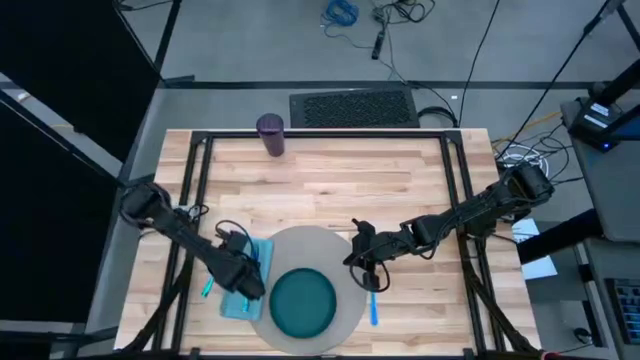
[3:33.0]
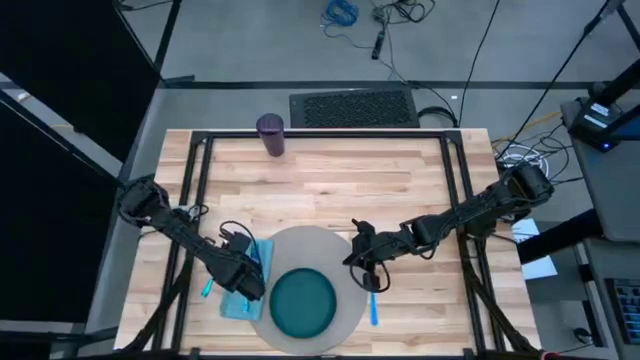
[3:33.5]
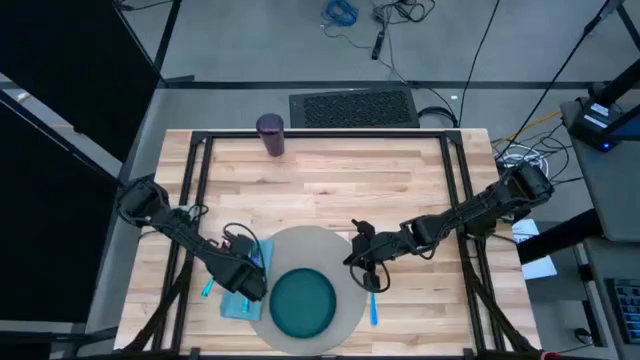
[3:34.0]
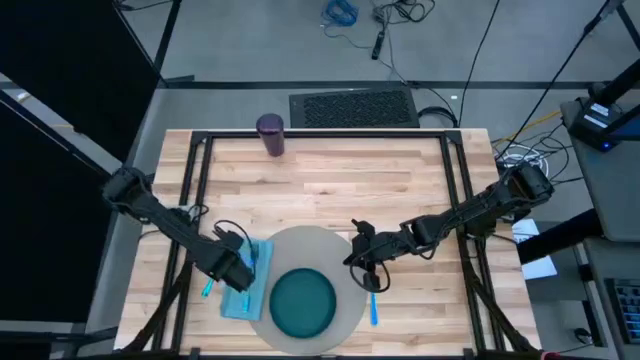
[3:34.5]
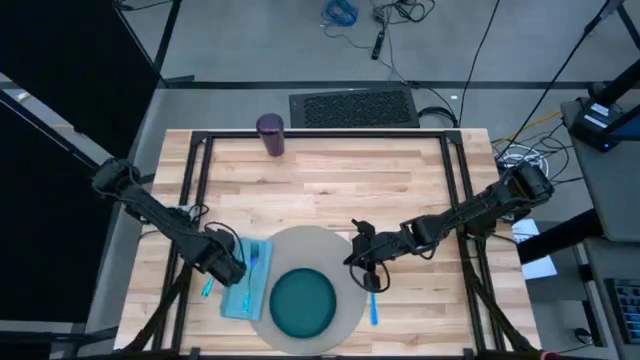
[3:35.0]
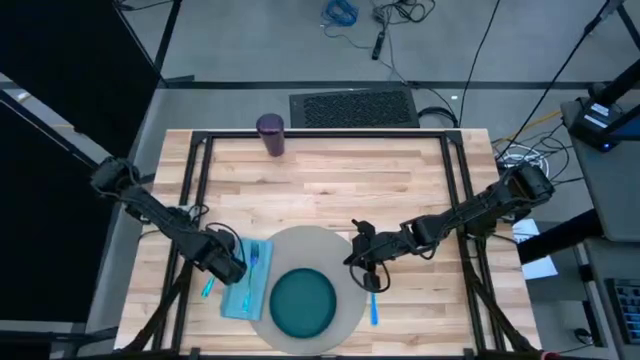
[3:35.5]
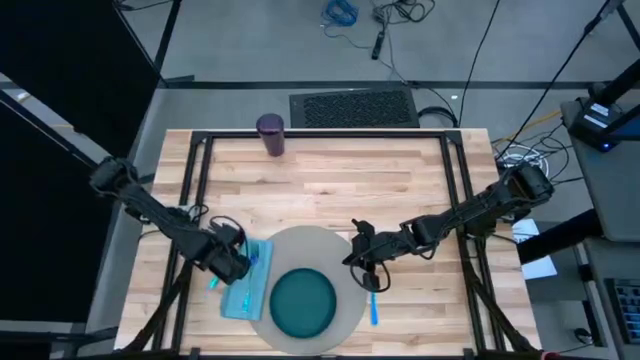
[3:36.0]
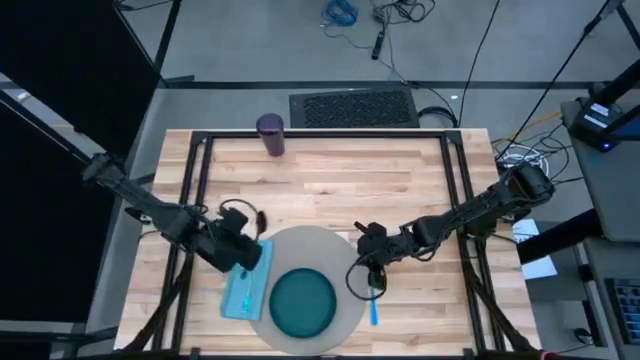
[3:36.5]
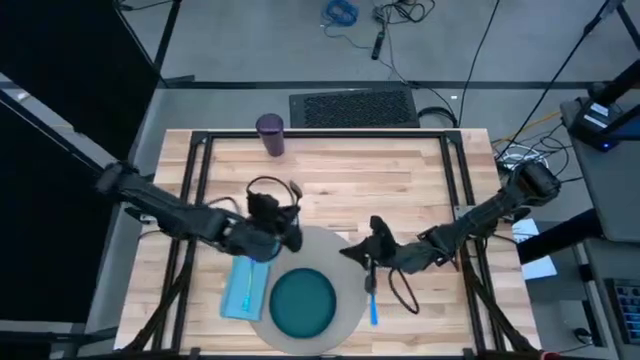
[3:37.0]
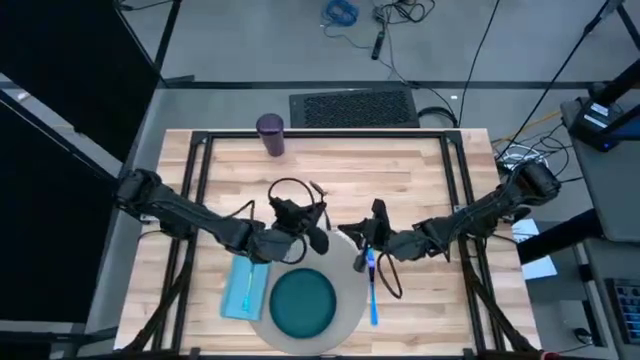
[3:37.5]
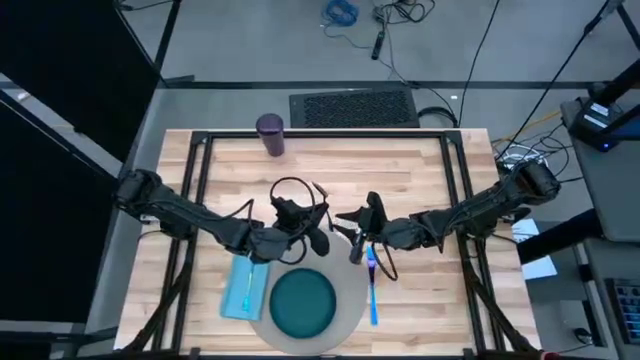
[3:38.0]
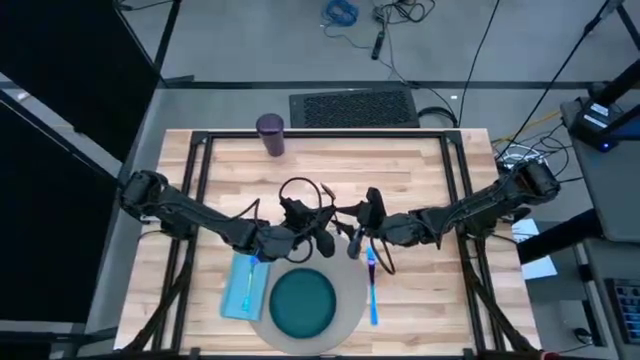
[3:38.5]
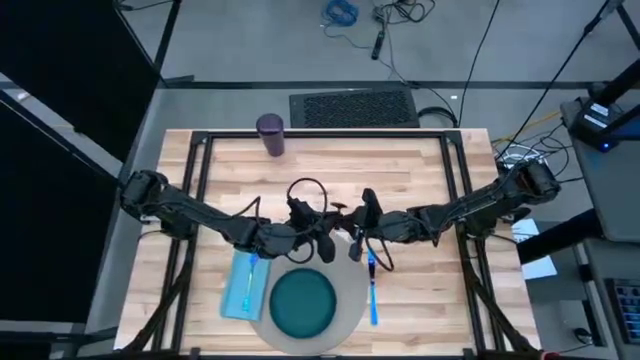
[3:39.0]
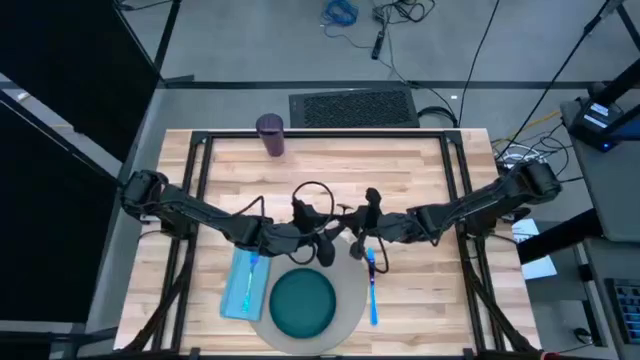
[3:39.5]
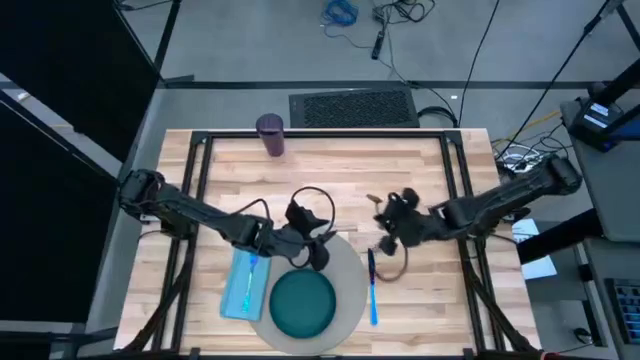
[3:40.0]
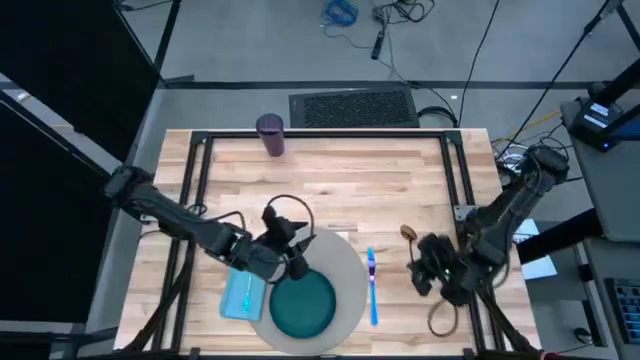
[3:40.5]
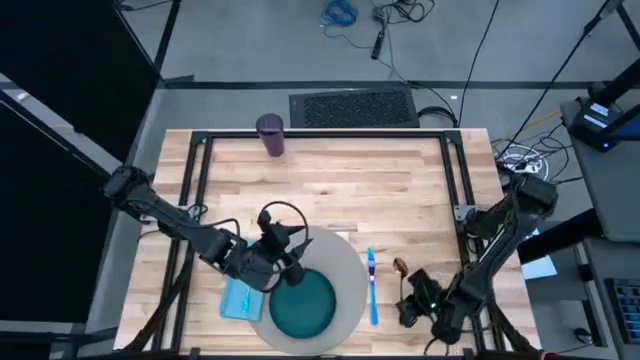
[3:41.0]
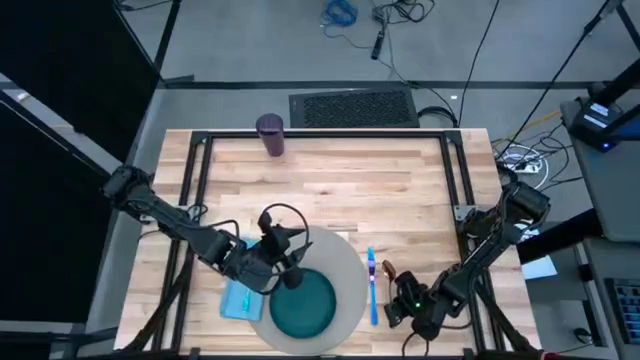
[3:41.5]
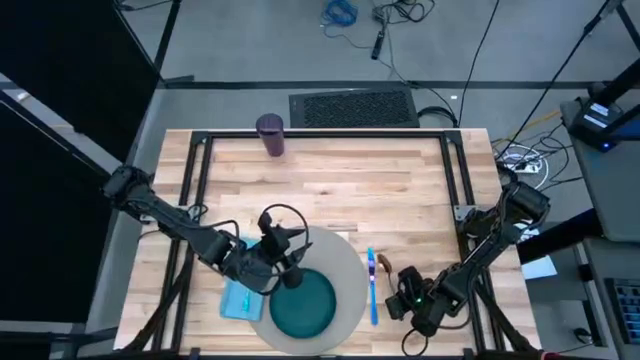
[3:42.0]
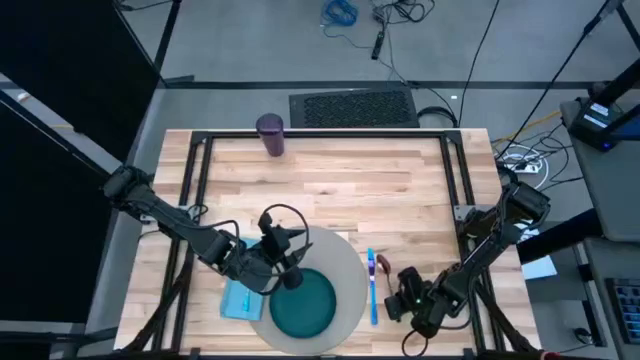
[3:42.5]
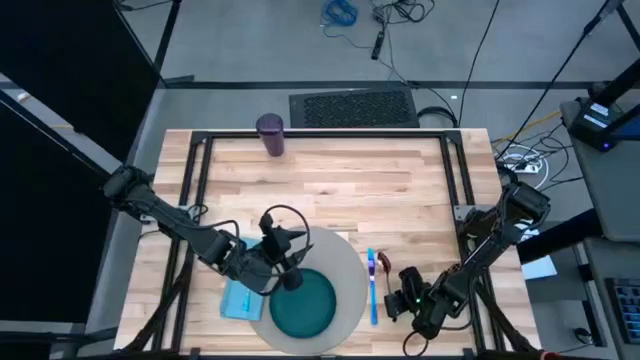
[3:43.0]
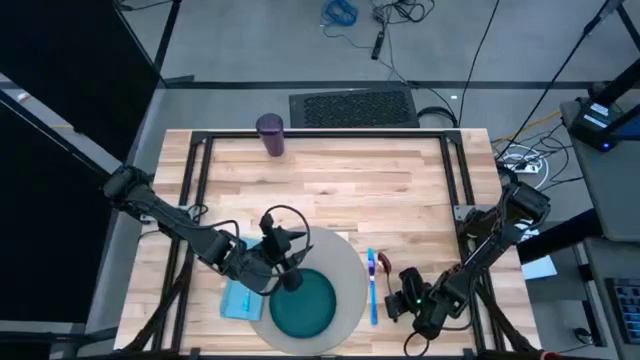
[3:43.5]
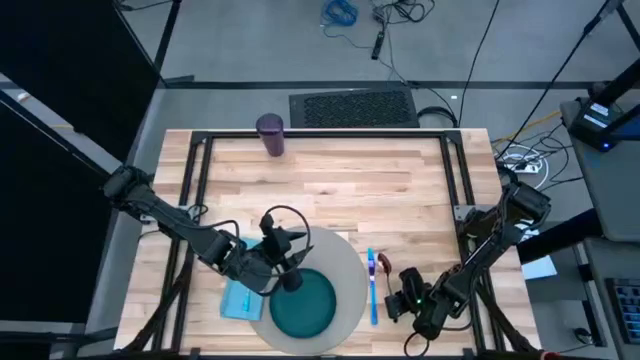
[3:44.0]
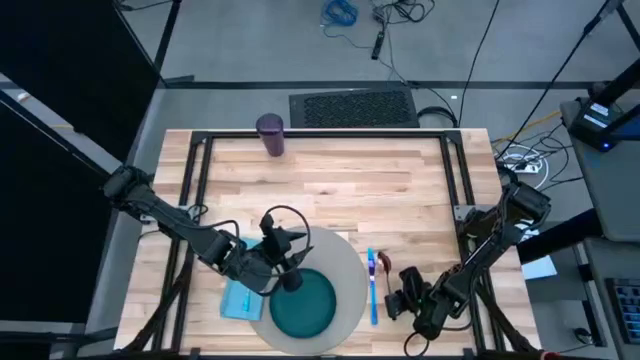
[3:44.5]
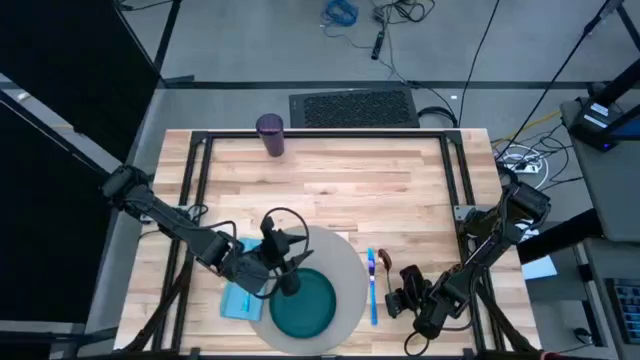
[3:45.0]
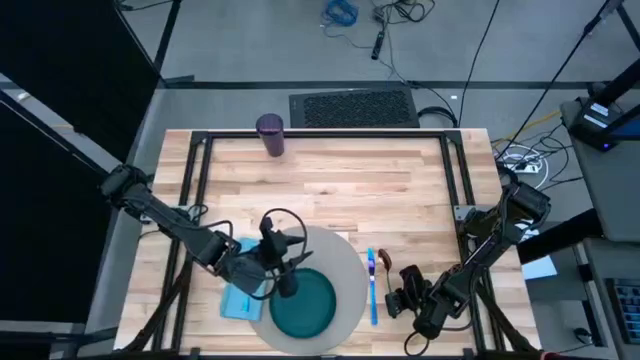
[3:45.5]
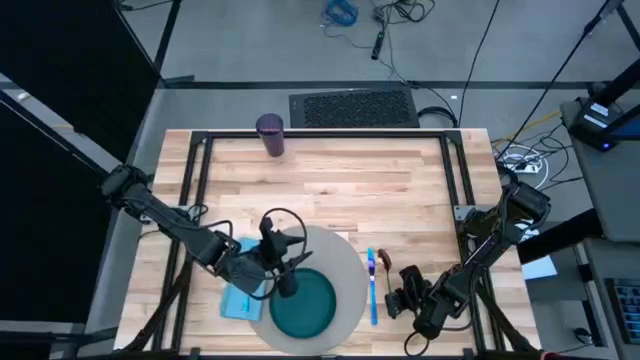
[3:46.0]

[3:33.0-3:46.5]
Task: Set table place
Put the blue spoon to the right of the blue table knife

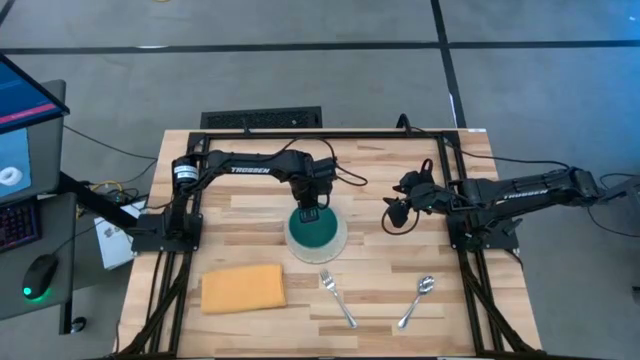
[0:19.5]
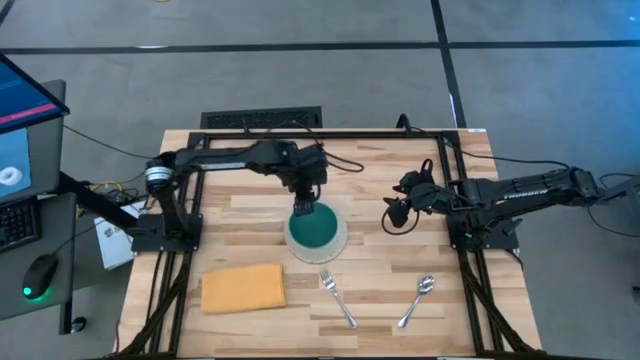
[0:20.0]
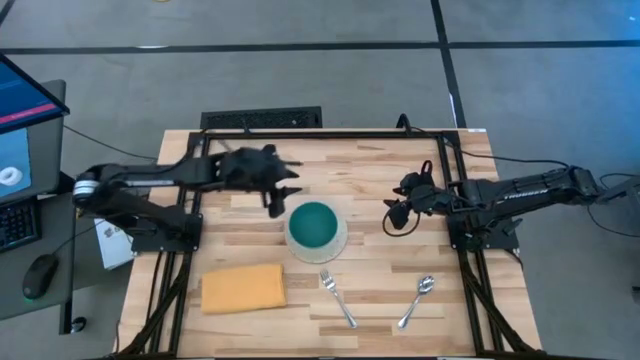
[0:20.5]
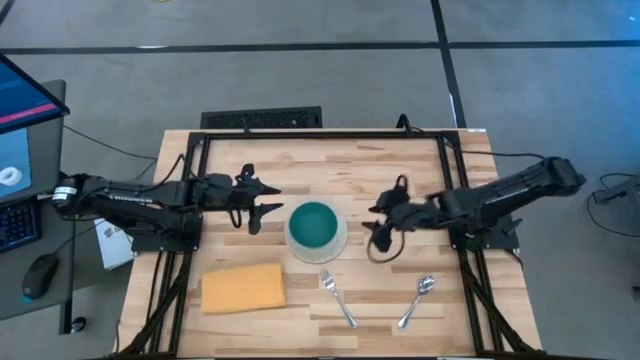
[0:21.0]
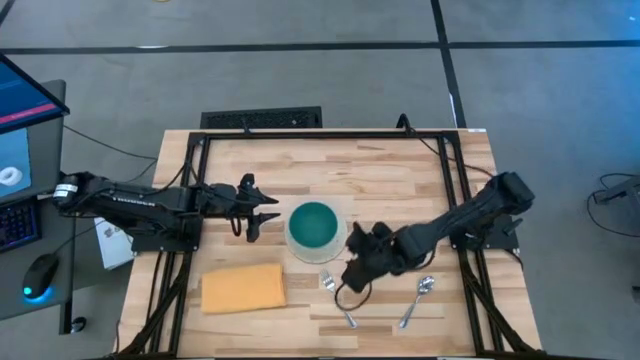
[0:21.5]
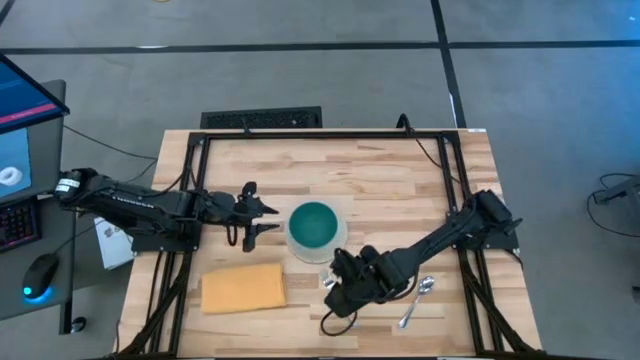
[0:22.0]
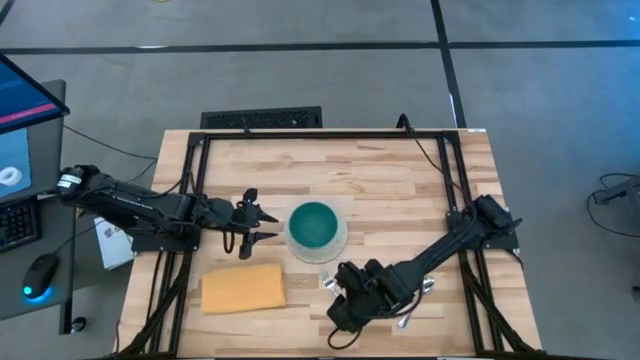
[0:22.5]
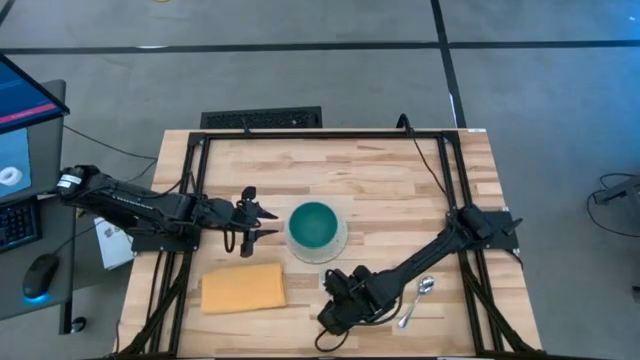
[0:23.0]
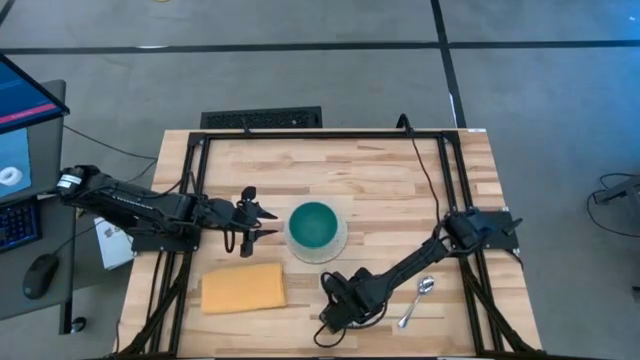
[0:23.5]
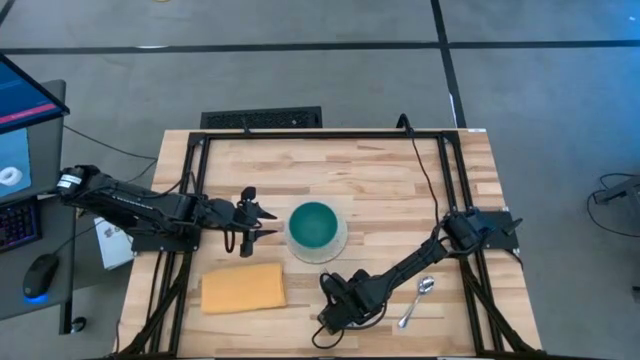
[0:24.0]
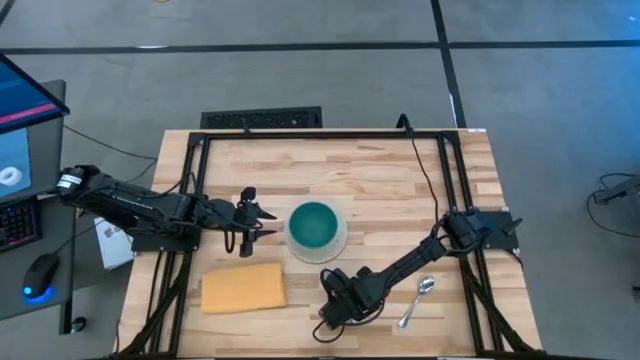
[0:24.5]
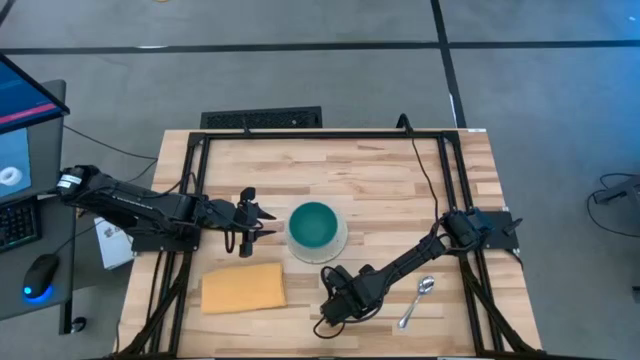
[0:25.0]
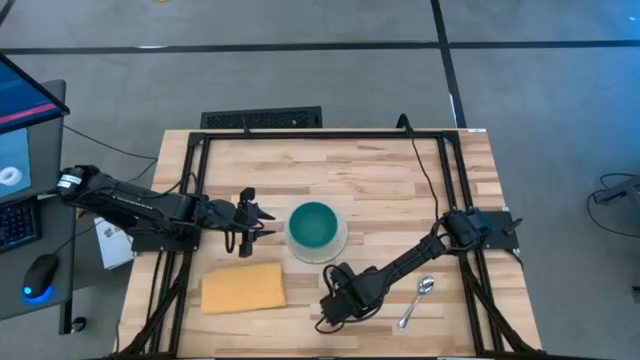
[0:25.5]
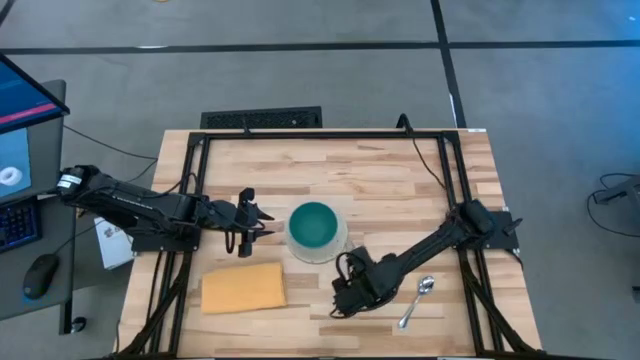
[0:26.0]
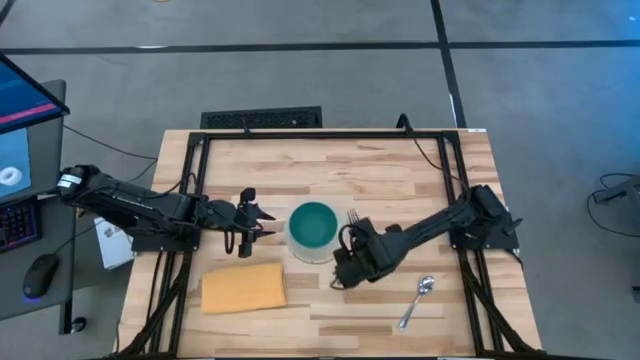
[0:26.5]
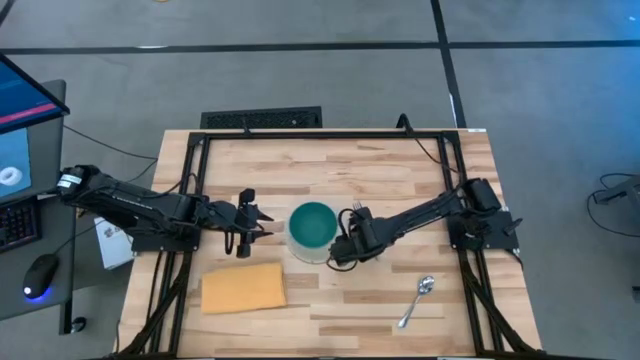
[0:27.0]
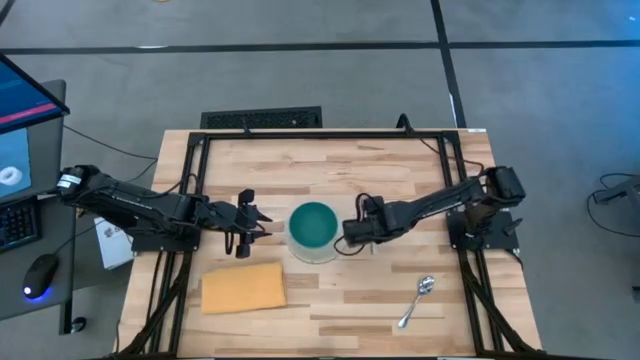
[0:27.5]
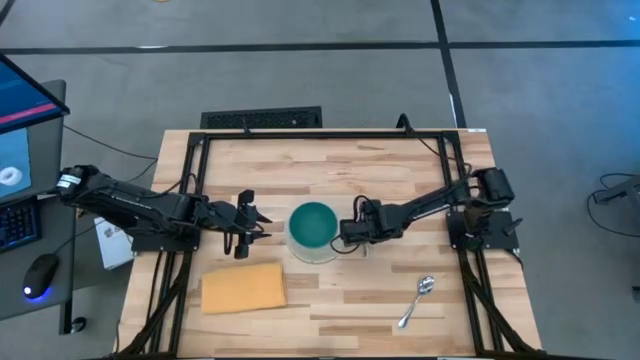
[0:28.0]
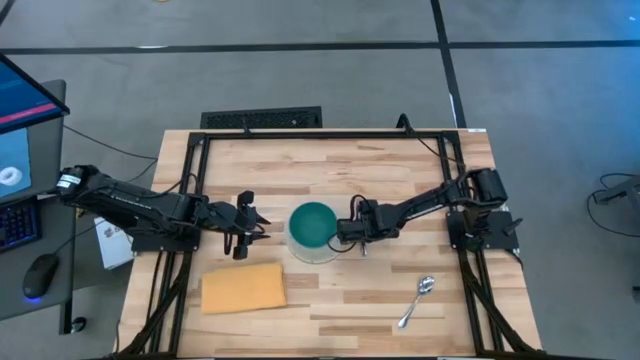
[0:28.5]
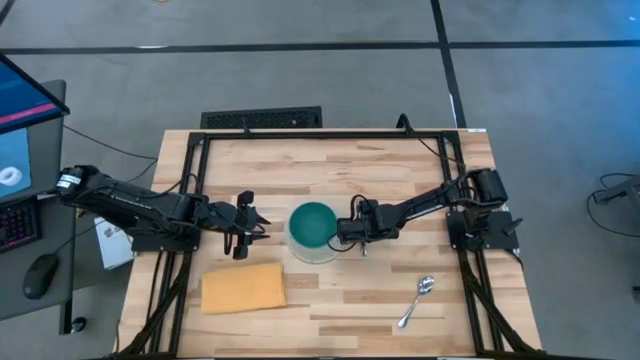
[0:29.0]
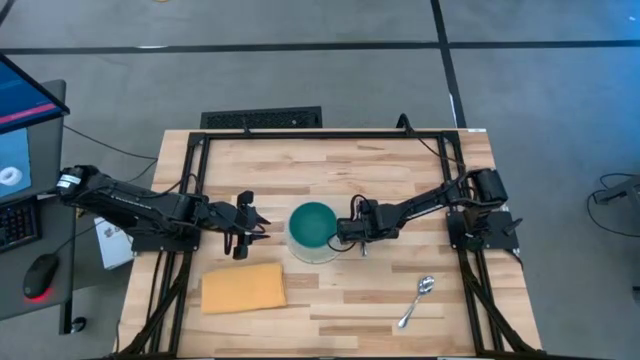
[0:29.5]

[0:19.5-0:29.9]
Task: Set table place
Move the fork from bottom to the right of the plate on the table
